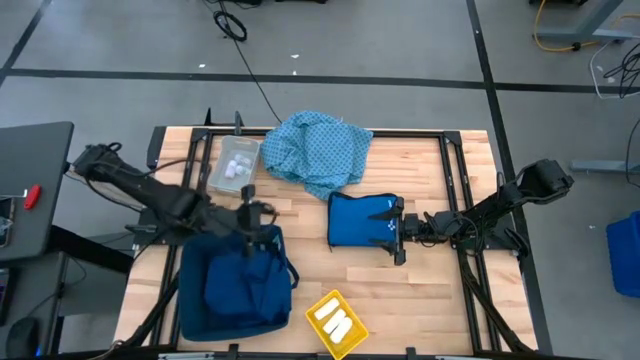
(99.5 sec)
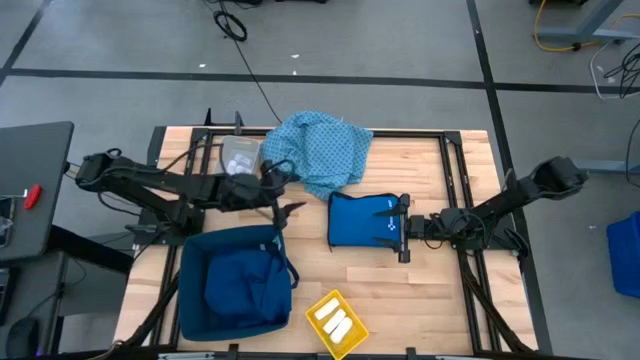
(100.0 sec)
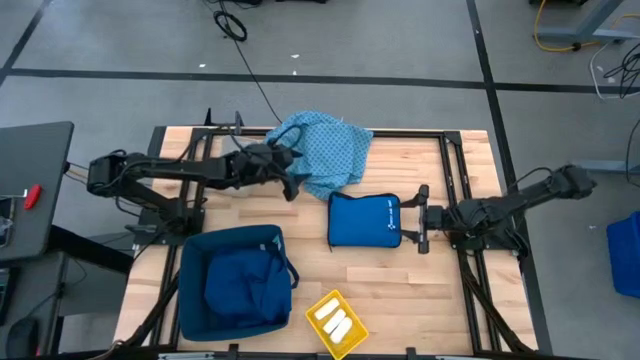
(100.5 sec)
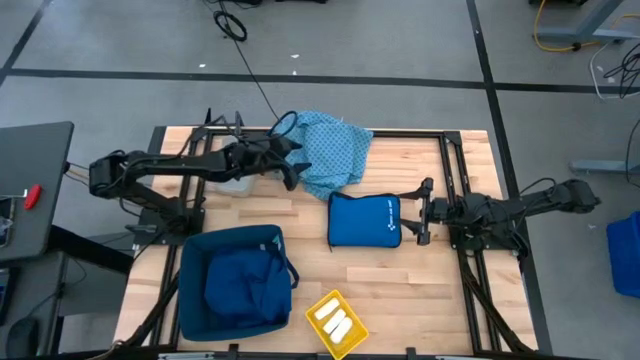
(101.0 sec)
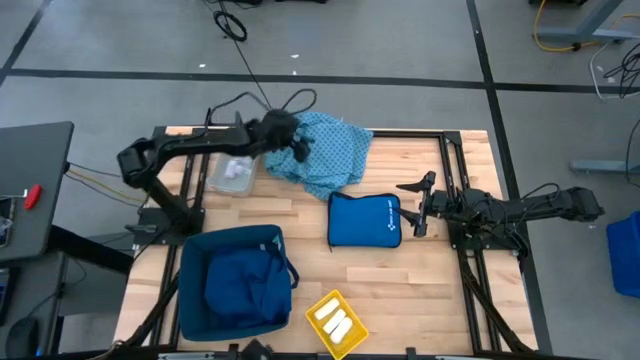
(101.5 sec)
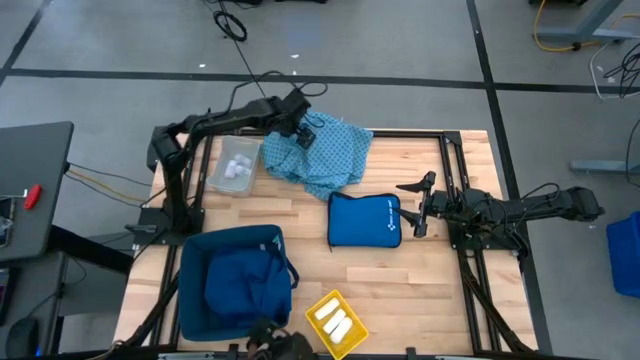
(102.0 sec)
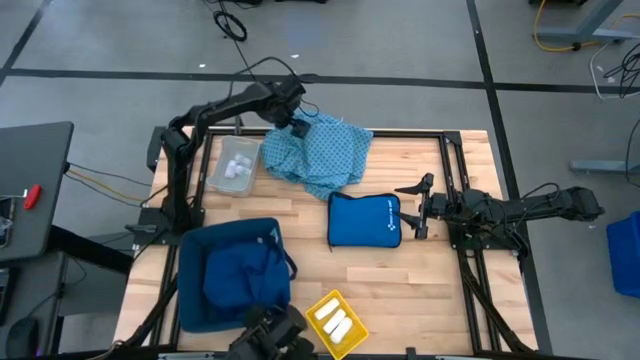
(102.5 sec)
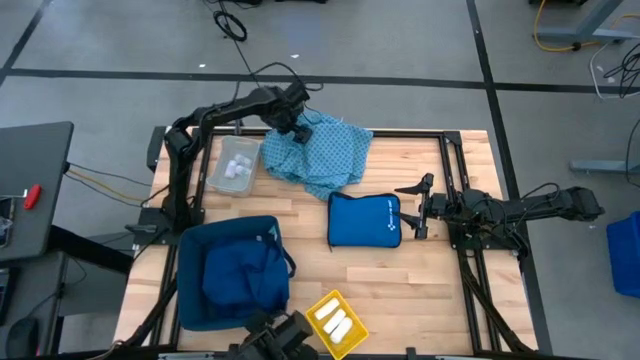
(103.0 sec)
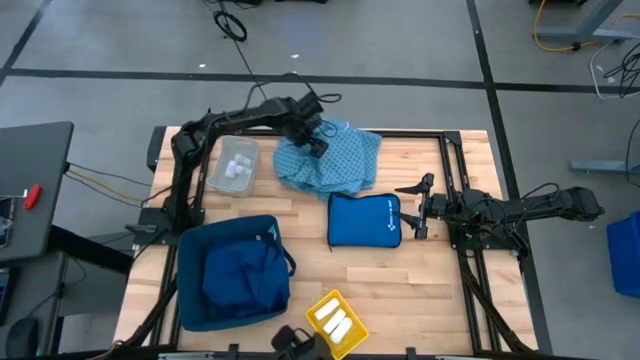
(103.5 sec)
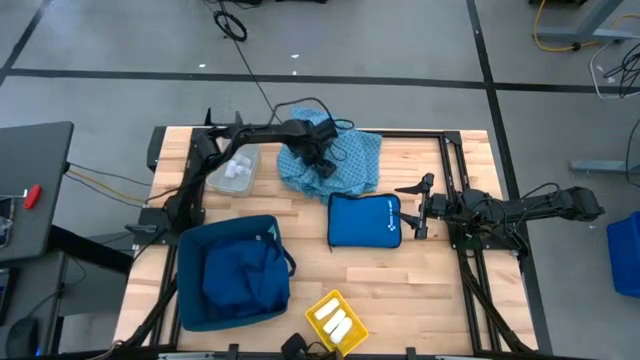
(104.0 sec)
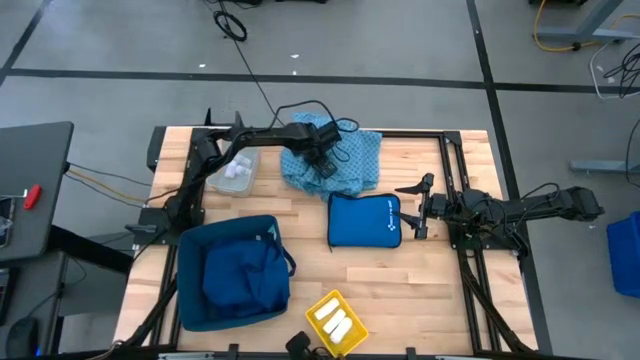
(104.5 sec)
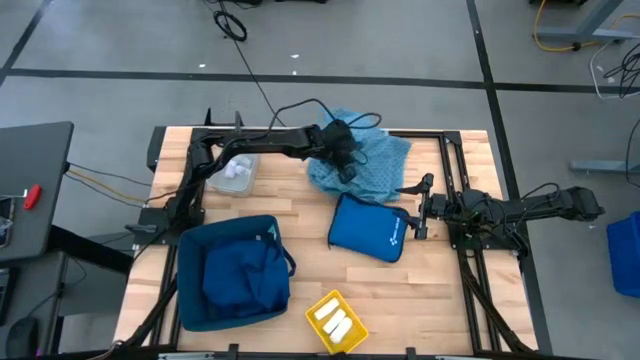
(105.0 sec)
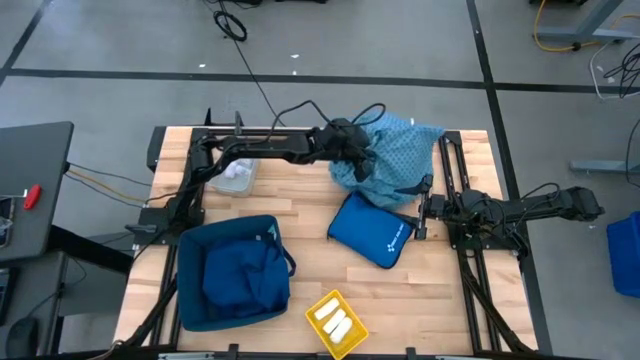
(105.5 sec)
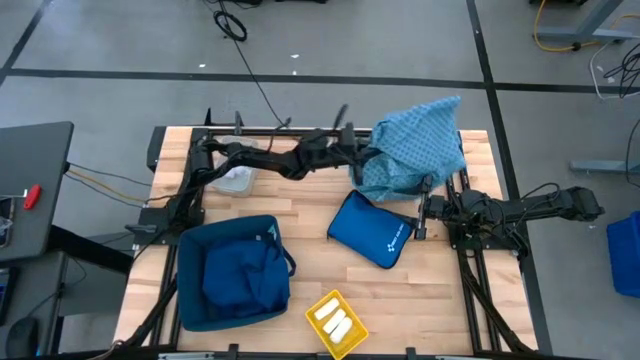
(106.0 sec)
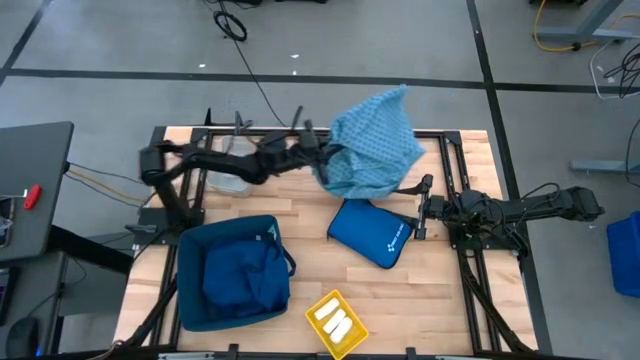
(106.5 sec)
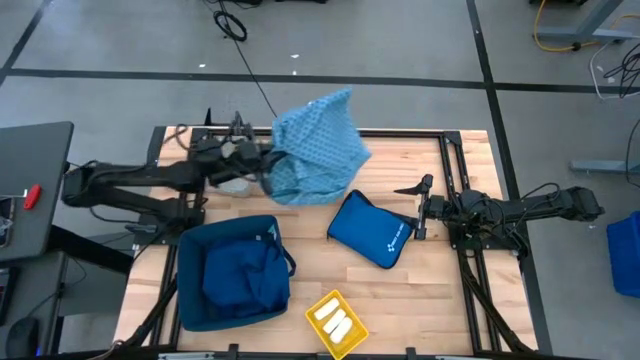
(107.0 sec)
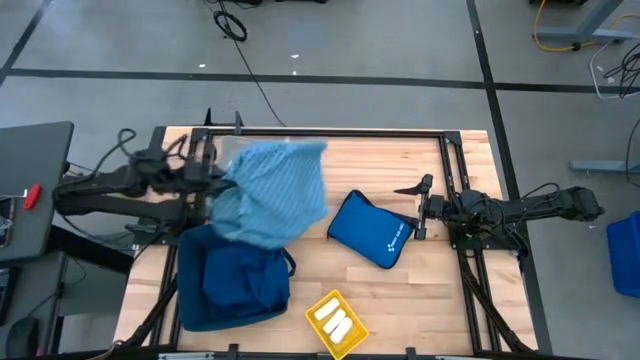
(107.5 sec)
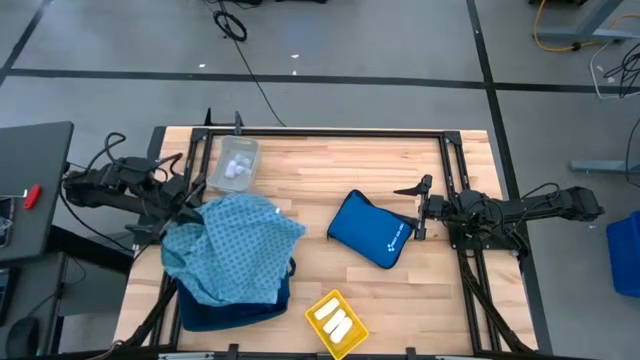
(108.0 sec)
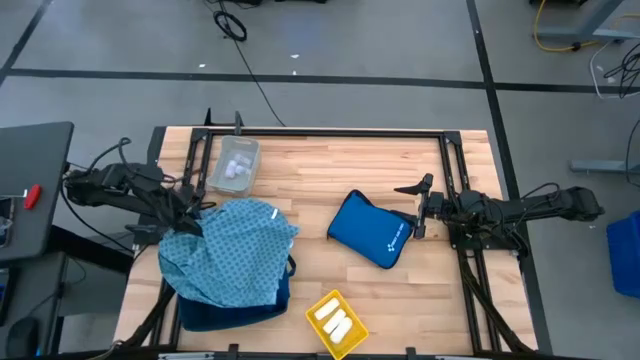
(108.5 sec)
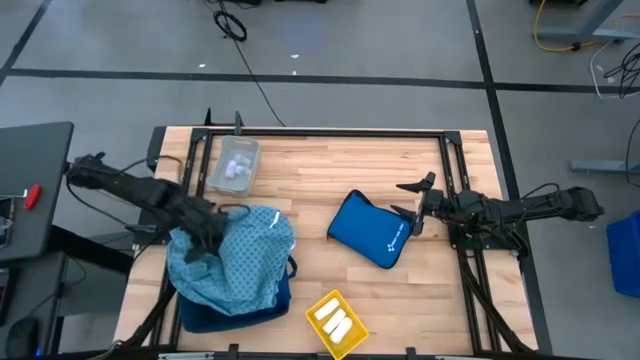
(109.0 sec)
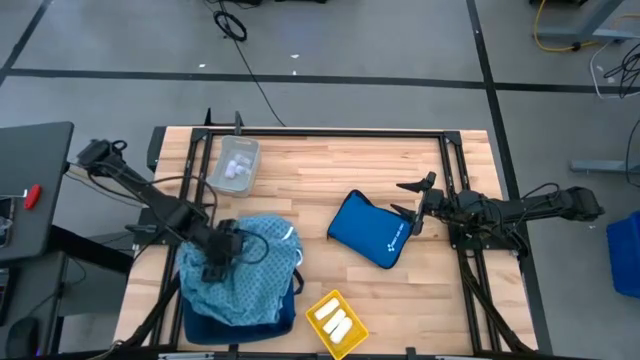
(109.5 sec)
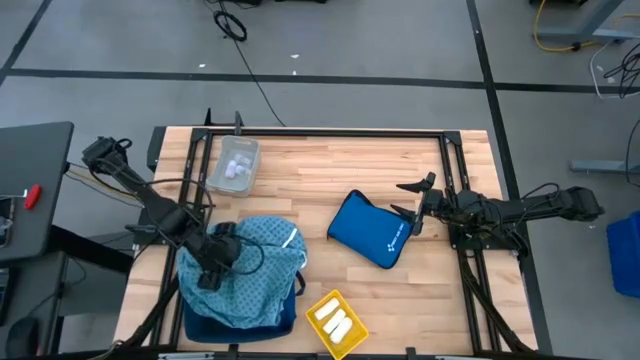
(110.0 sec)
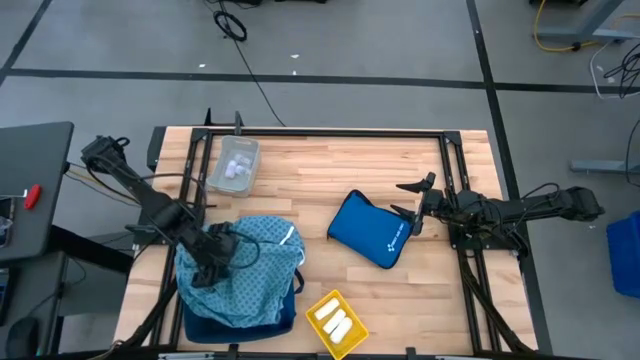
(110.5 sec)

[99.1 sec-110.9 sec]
Task: Pick & place medical supplies in basket/bin
Put the light blue patient gown into the blue bin

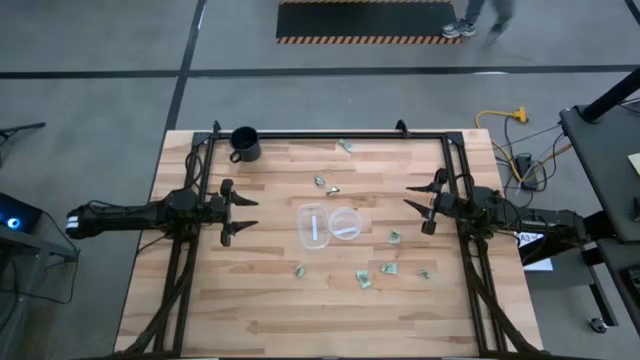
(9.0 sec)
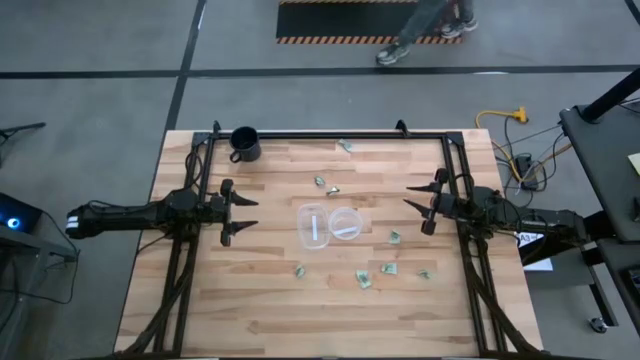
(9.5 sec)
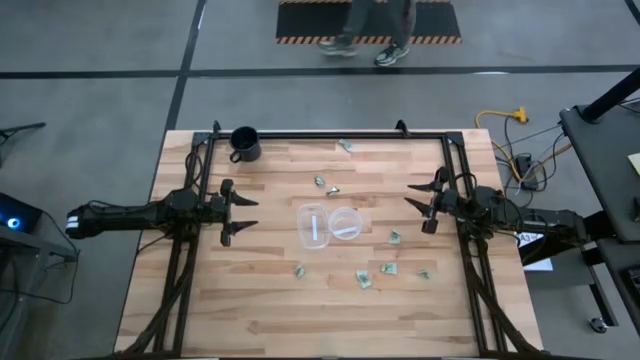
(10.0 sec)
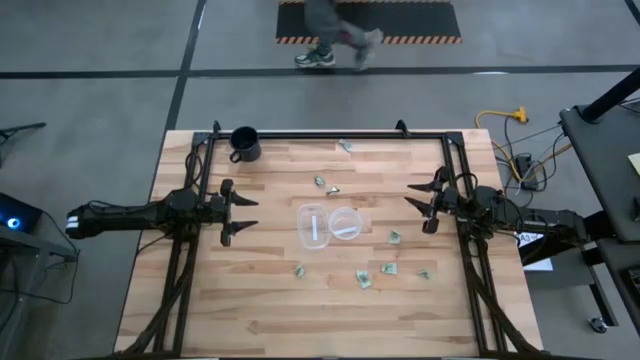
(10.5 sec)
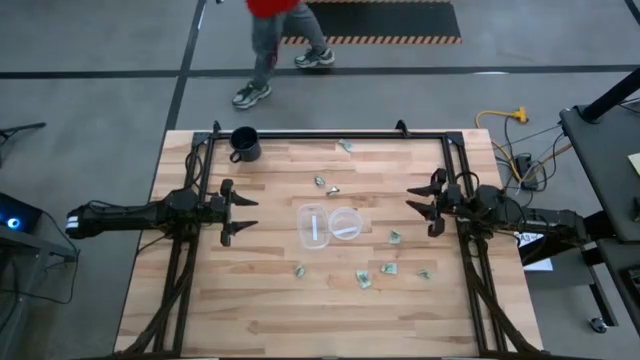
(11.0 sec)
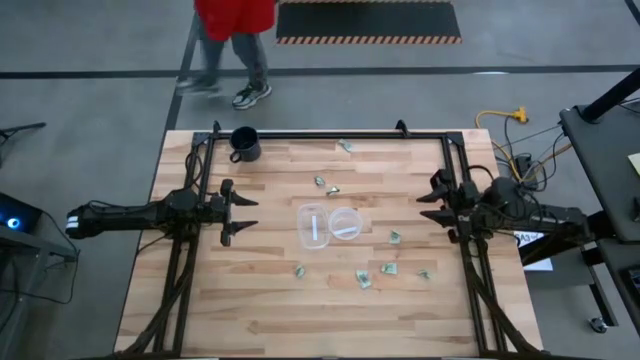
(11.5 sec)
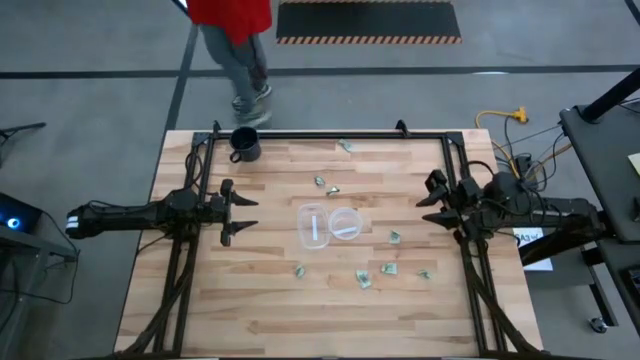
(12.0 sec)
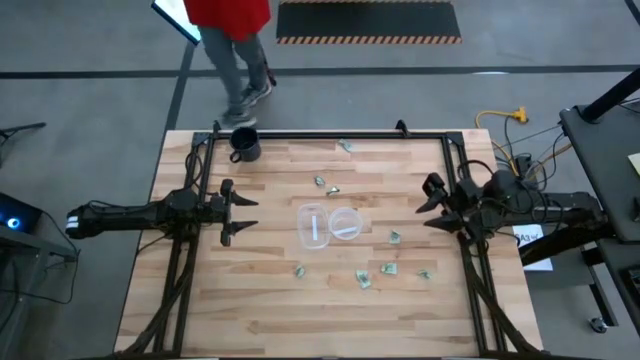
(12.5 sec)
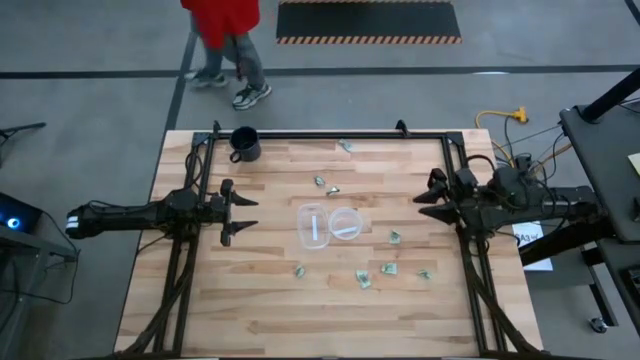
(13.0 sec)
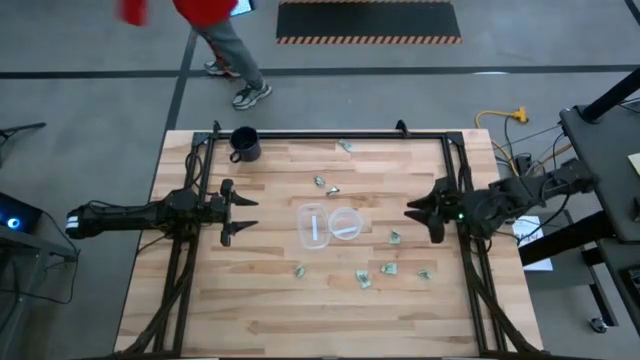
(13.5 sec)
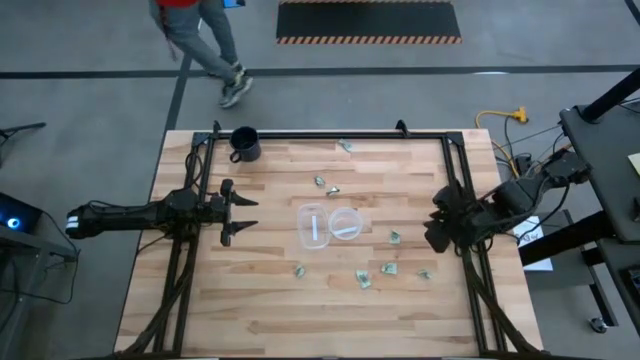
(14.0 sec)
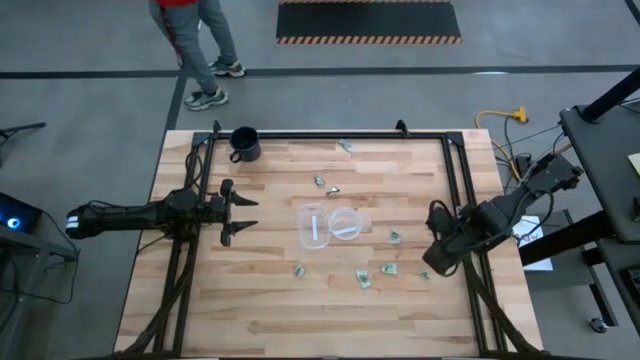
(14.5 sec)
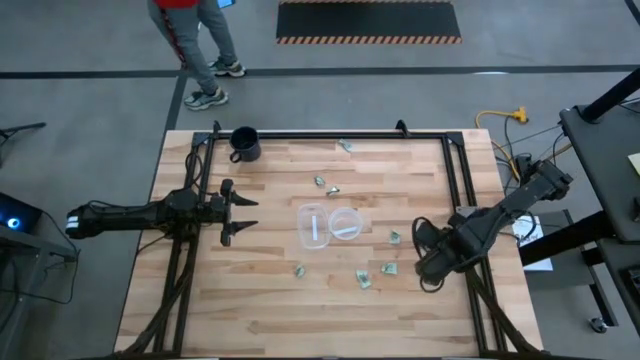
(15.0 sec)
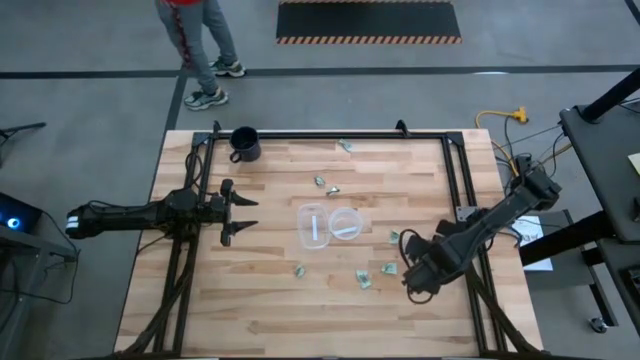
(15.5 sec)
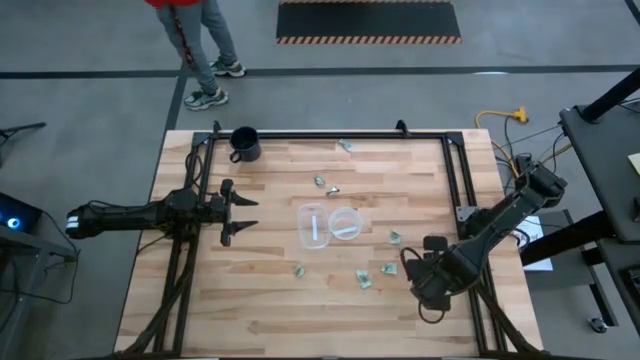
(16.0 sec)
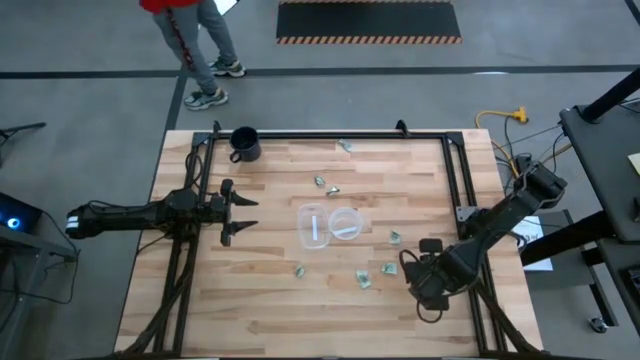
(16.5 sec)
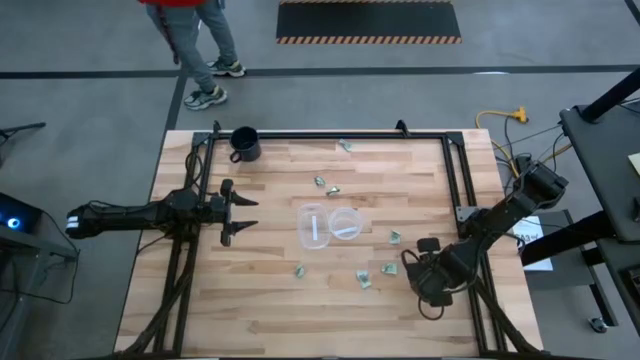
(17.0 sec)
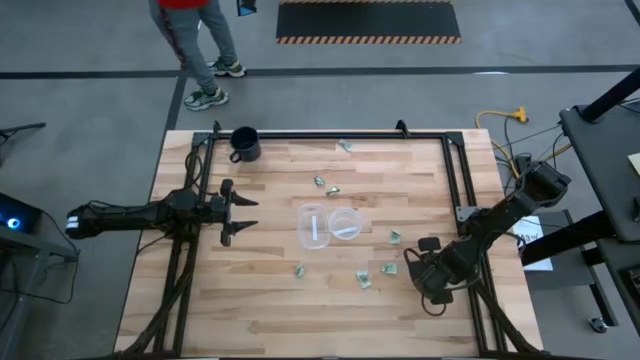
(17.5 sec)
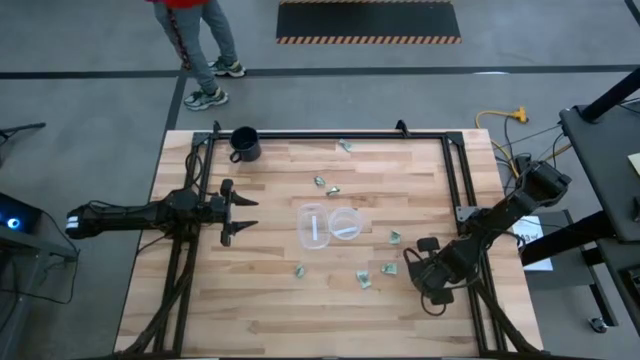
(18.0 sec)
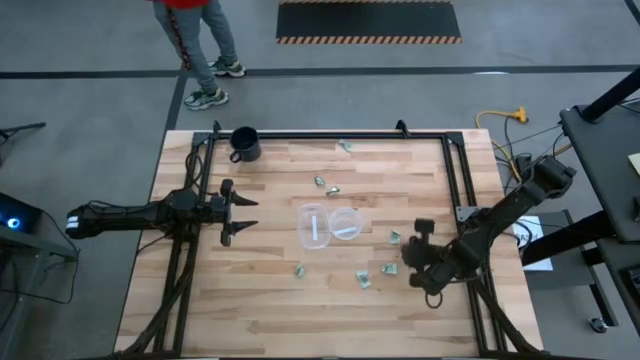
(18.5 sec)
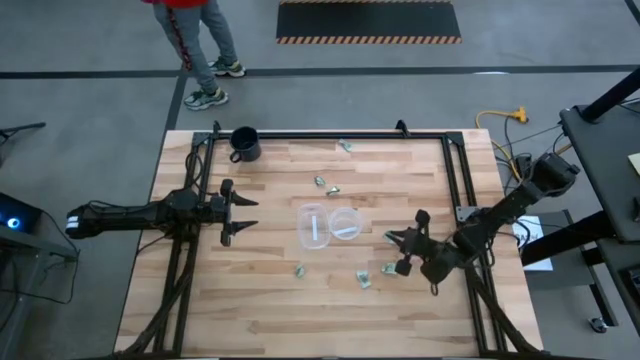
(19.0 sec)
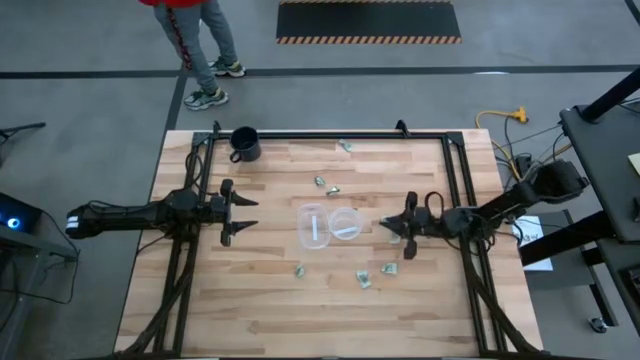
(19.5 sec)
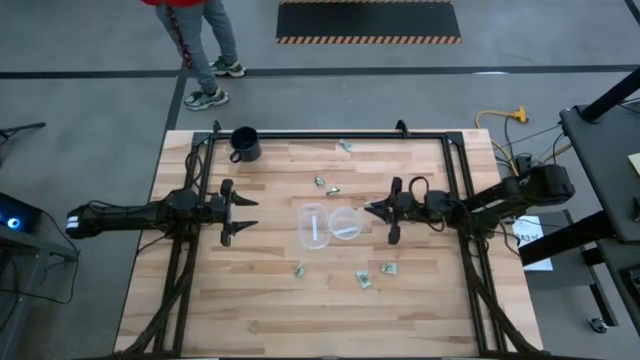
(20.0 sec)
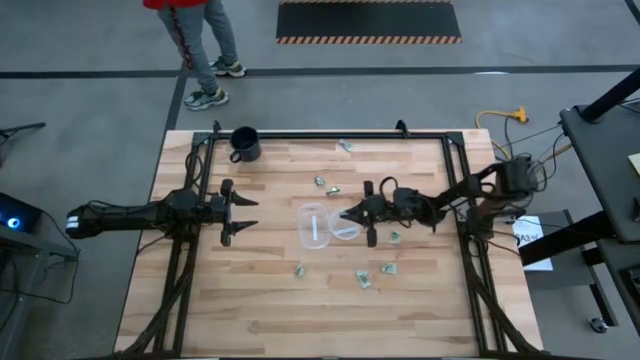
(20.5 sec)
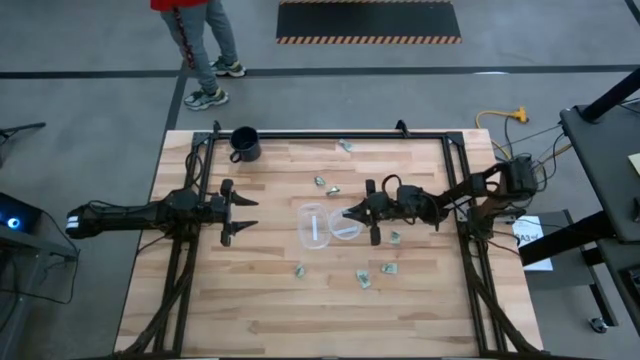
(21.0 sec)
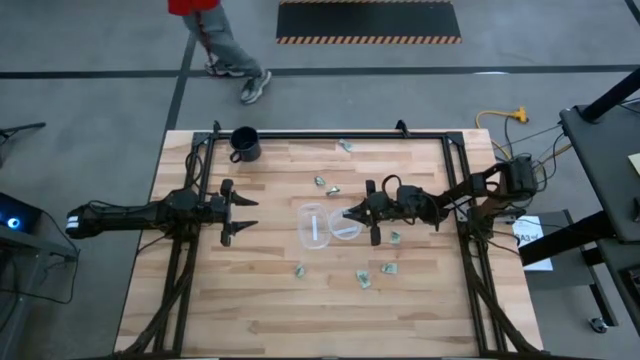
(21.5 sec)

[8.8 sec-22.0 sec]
Task: Pick and place Stevia / Truvia into bins
Put the green stevia packet into the right transparent container
